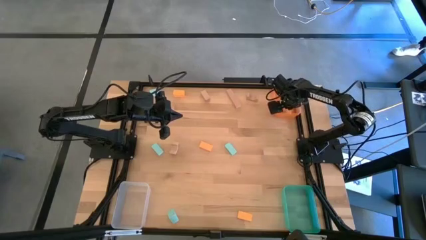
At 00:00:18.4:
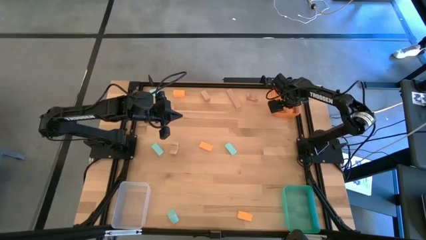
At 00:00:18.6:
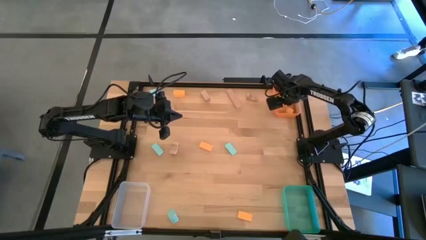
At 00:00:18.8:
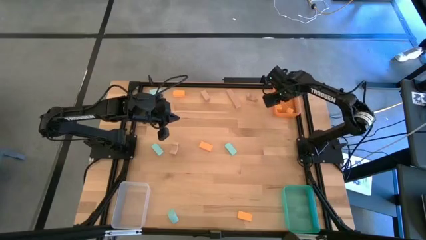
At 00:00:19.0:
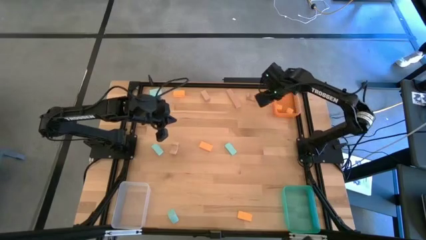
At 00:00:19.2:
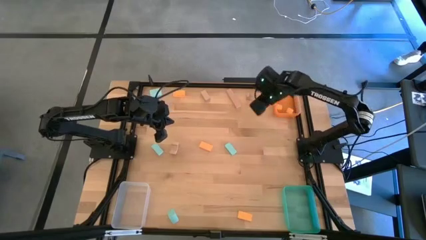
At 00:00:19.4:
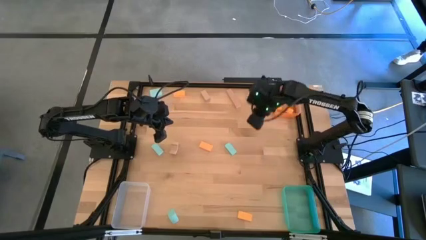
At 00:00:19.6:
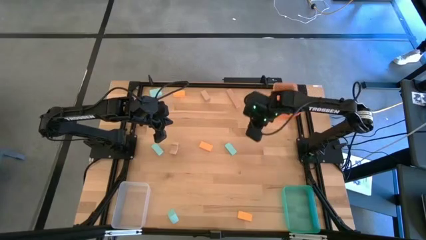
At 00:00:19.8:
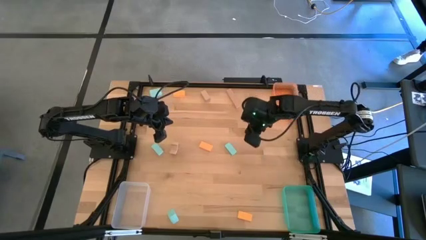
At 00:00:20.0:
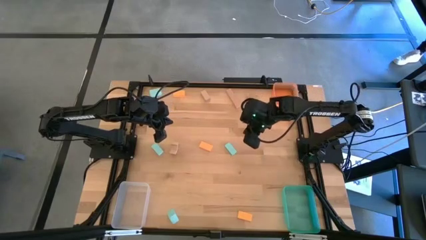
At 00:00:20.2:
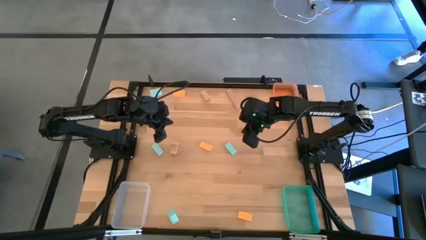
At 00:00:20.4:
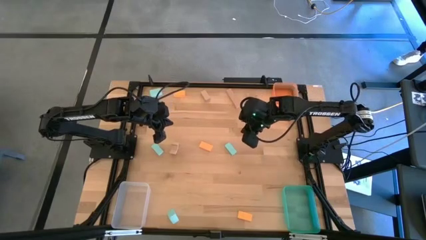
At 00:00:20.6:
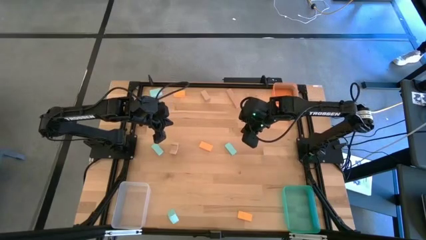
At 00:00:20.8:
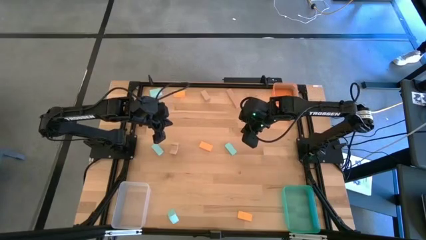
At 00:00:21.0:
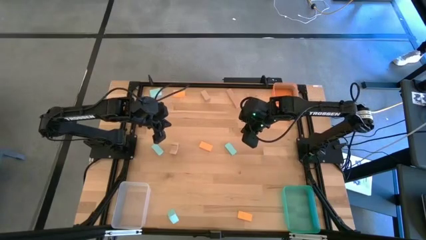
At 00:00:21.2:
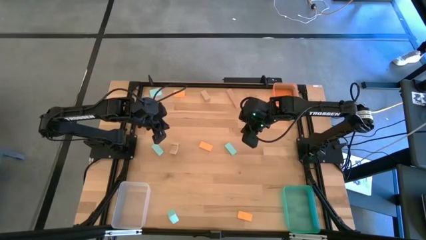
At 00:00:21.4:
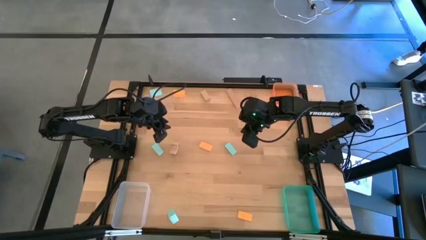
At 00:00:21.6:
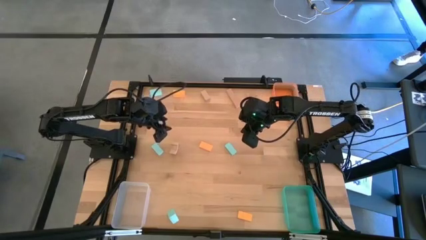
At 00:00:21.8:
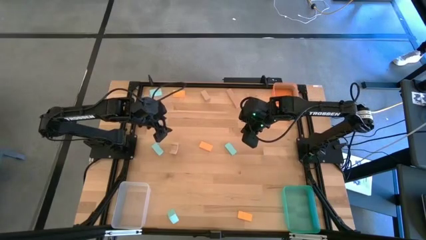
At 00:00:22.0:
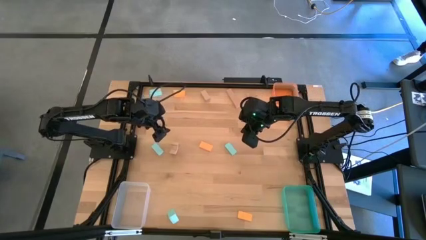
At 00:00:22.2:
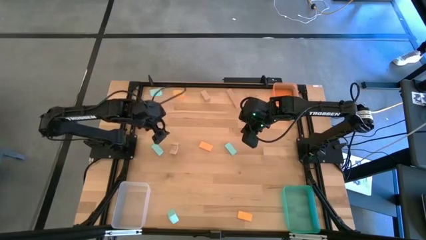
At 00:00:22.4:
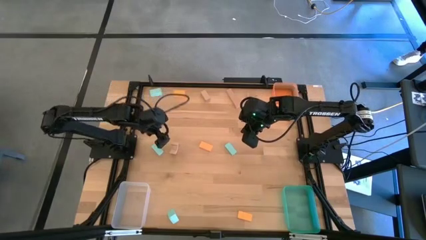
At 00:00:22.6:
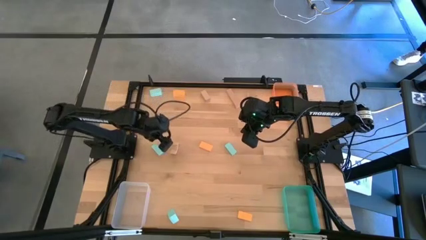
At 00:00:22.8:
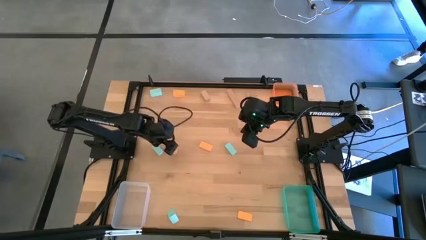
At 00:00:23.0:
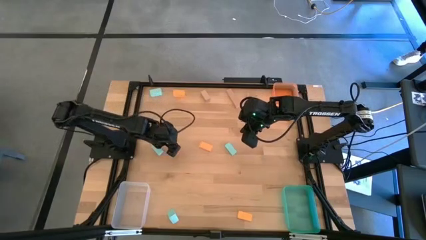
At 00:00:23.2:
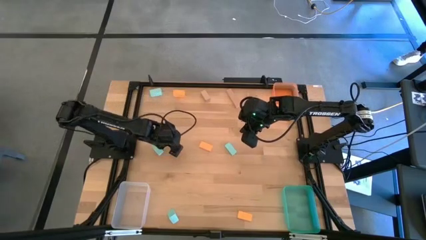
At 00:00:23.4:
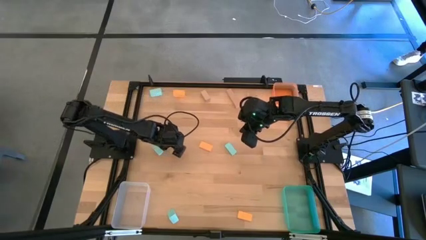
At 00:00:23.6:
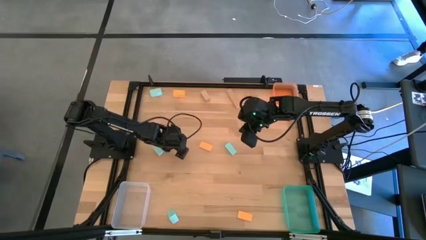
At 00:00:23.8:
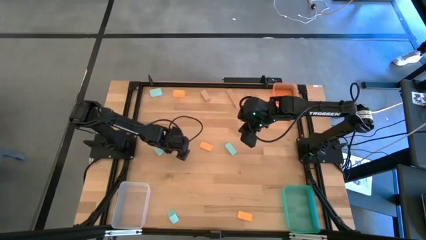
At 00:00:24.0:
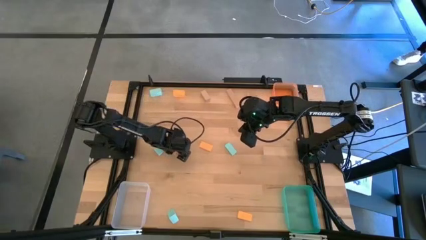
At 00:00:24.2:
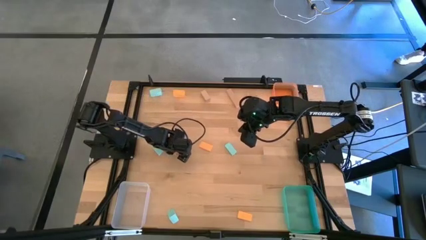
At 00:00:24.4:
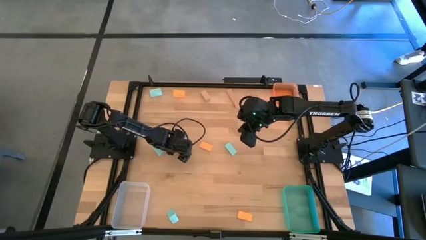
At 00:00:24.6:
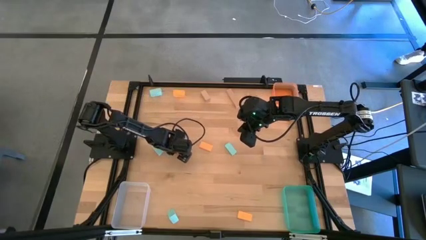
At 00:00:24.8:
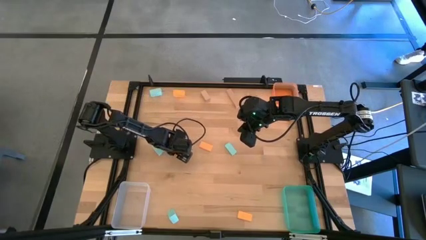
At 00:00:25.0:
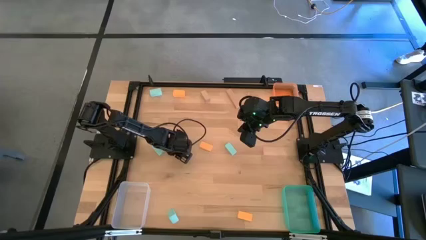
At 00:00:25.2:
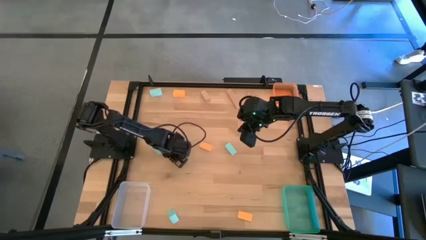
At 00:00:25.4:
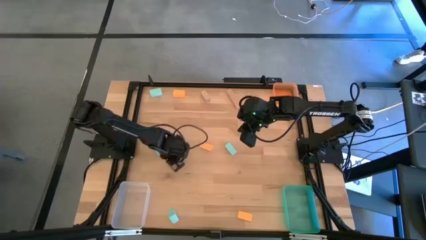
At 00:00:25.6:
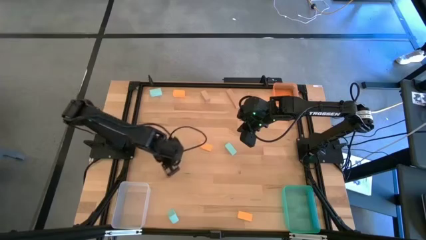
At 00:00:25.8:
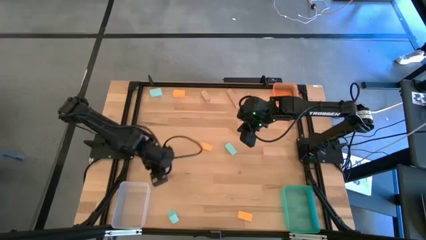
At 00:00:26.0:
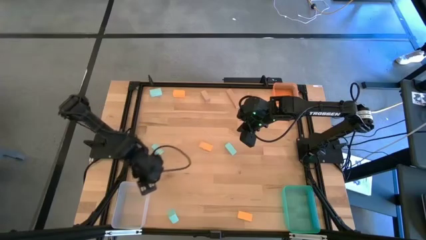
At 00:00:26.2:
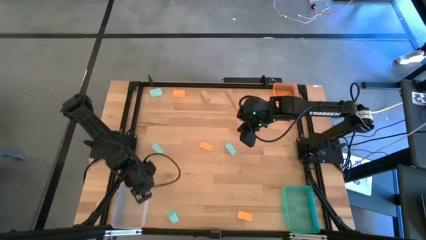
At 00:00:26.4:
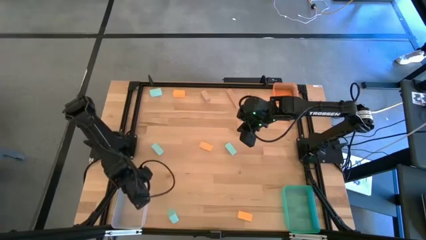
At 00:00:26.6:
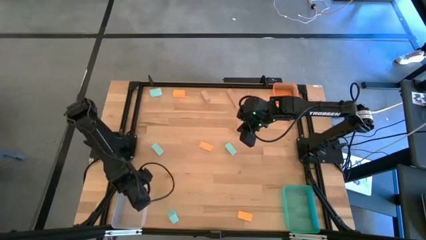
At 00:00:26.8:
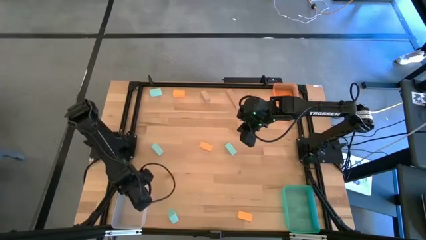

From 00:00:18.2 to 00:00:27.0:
Task: Sort & place blocks by color
Put the brown block into the transparent bin

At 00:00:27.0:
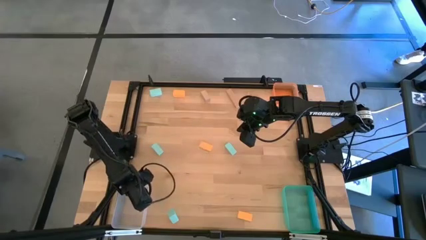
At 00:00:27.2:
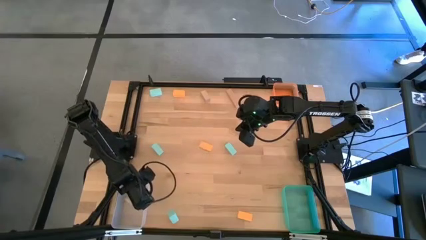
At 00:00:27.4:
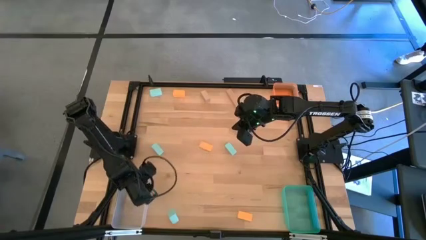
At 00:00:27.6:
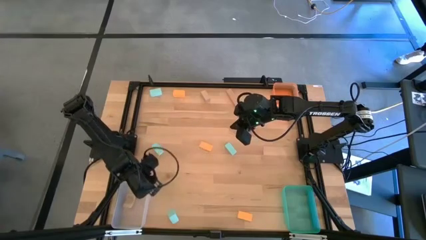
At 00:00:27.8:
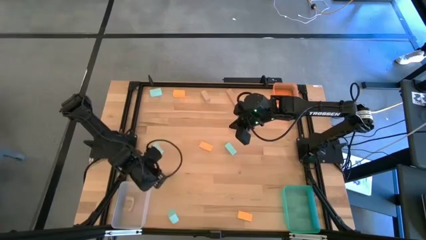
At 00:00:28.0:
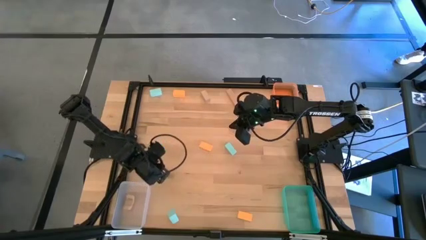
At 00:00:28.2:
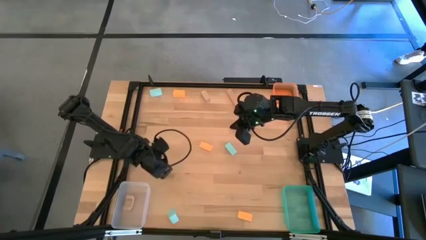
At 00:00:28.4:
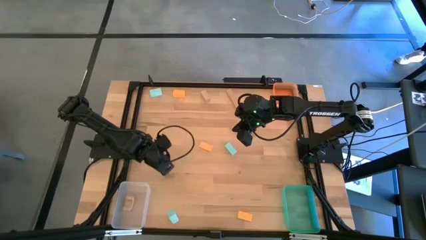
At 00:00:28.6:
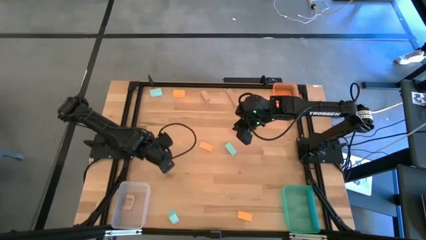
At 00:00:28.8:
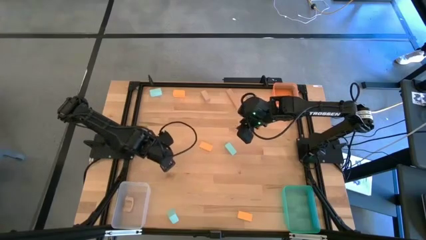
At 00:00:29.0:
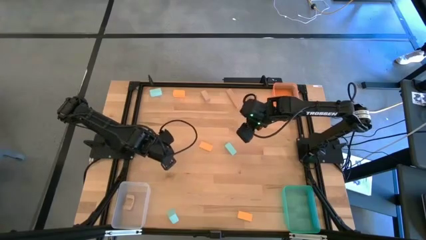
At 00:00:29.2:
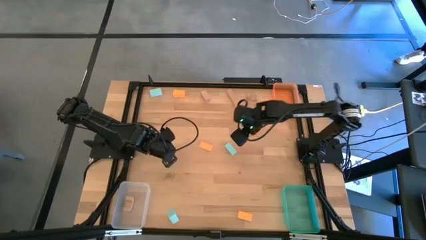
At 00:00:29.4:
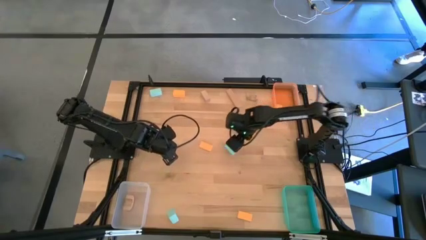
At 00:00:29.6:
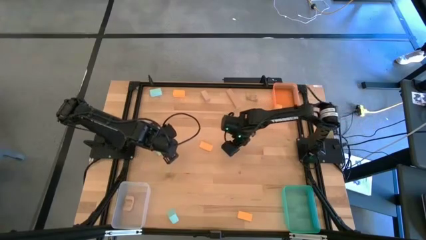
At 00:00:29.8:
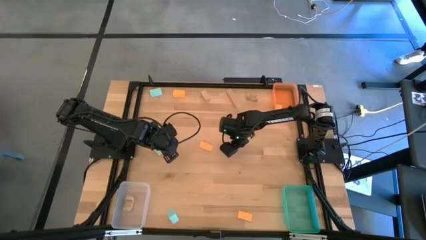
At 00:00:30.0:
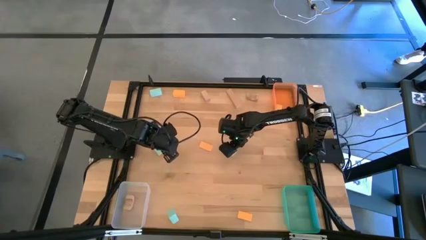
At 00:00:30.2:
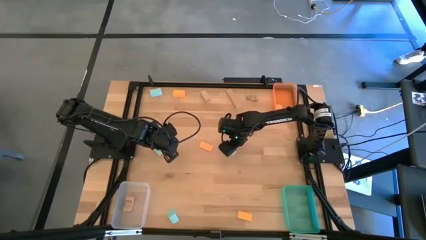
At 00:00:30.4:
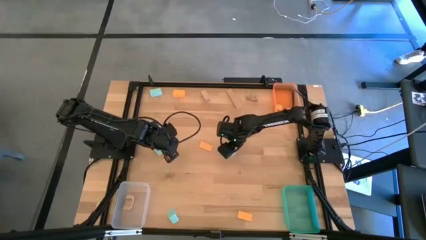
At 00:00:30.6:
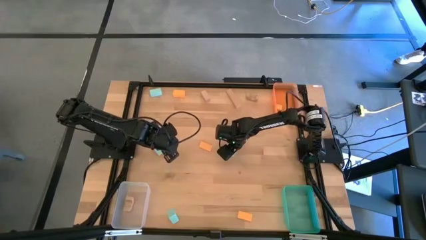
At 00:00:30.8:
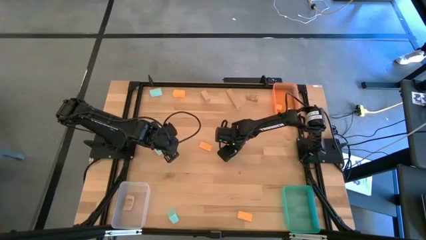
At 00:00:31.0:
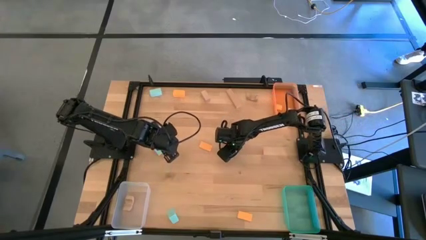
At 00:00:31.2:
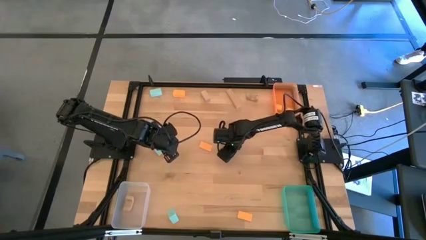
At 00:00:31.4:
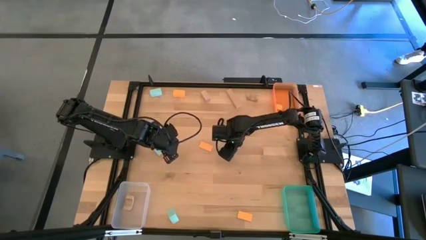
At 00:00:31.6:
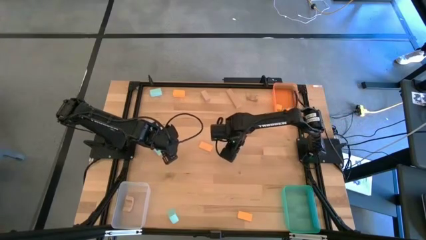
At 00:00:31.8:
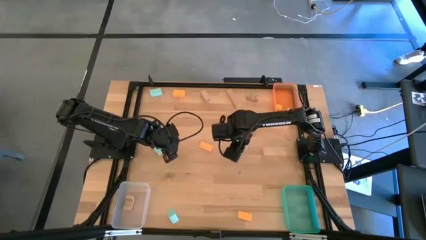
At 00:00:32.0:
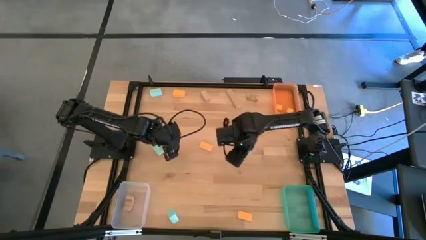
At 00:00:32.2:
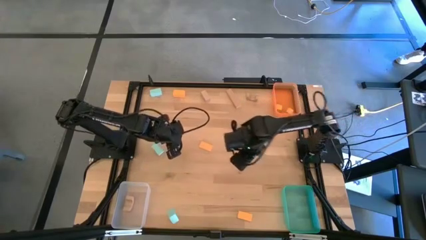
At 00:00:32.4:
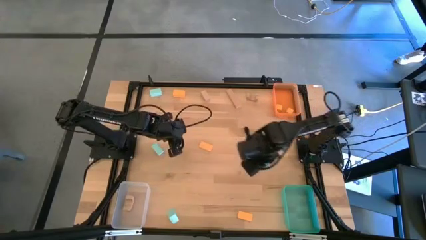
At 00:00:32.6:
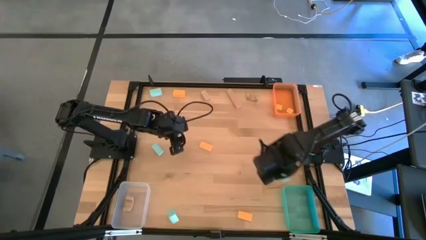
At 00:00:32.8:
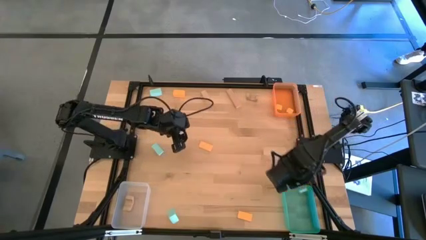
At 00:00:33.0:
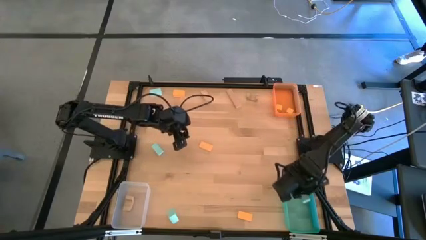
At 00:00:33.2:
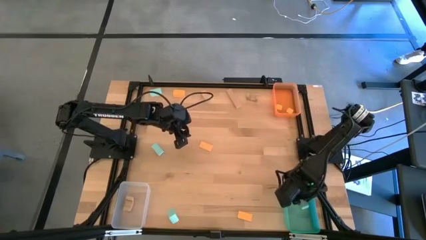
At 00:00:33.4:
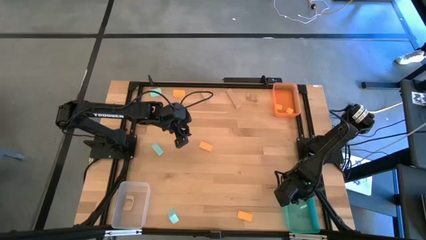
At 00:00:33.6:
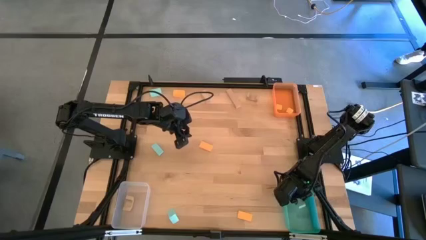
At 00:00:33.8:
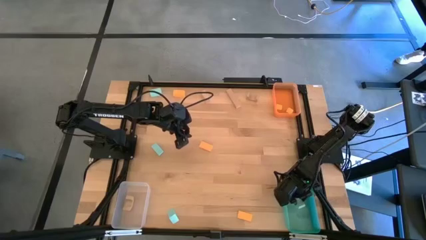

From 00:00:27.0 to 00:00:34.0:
Put the blue block into the green bin
